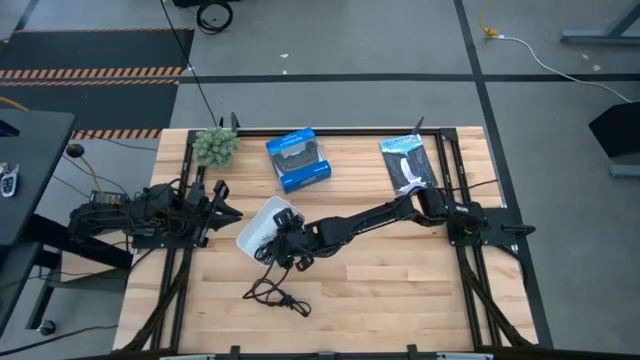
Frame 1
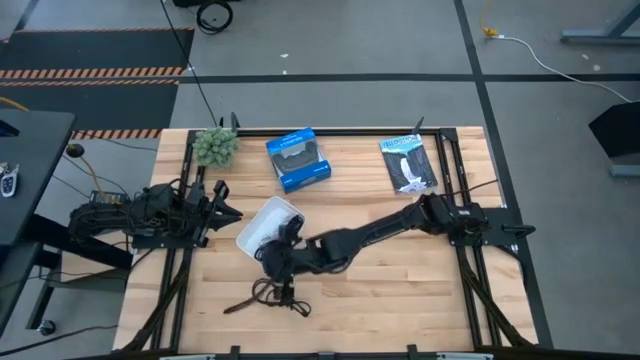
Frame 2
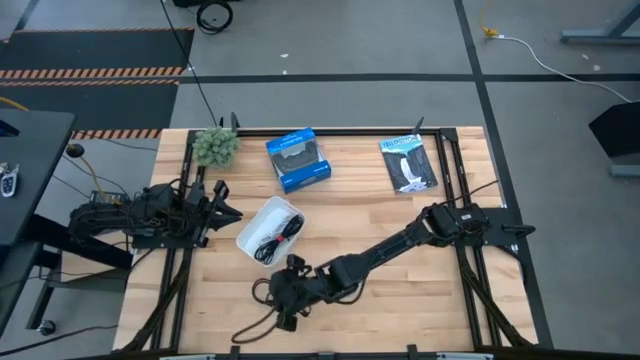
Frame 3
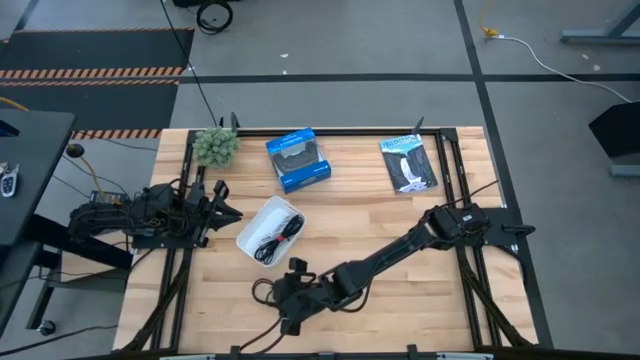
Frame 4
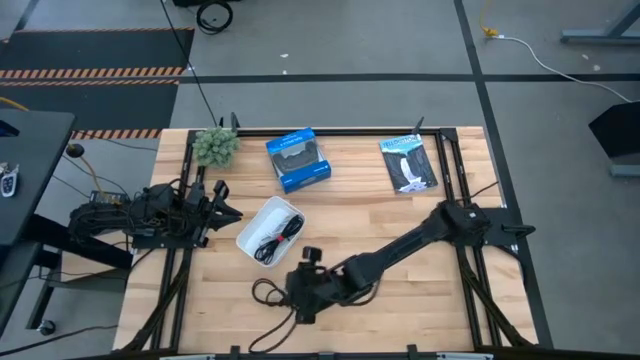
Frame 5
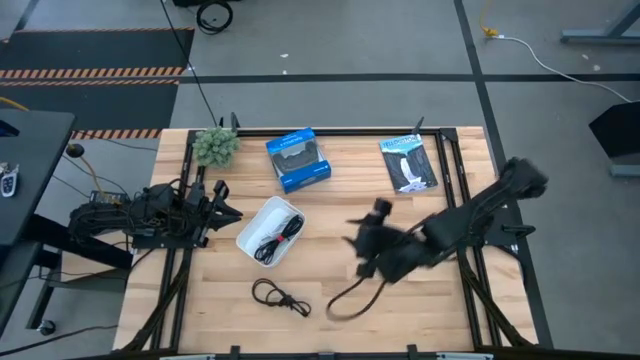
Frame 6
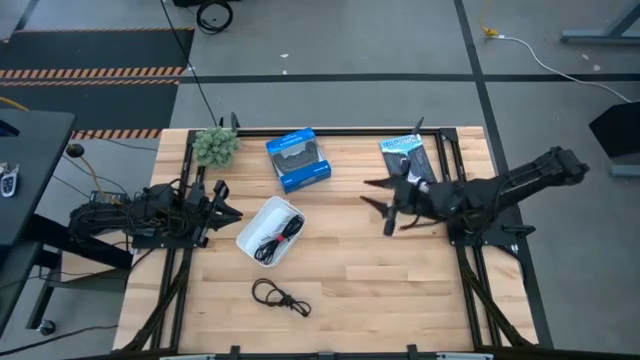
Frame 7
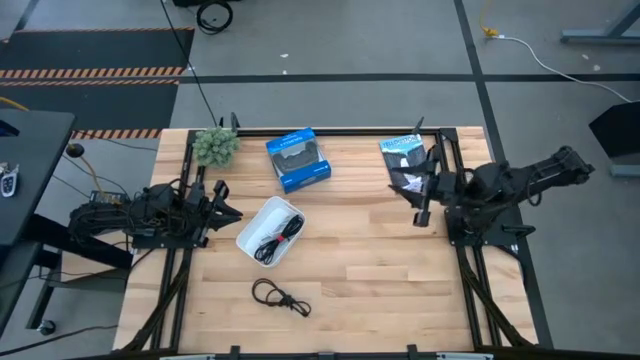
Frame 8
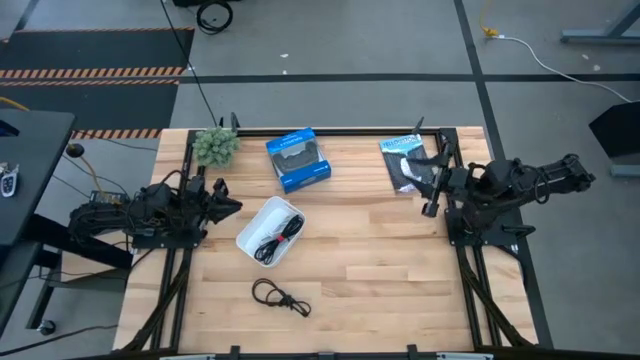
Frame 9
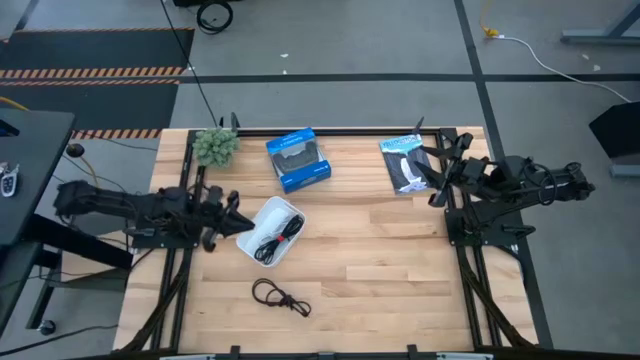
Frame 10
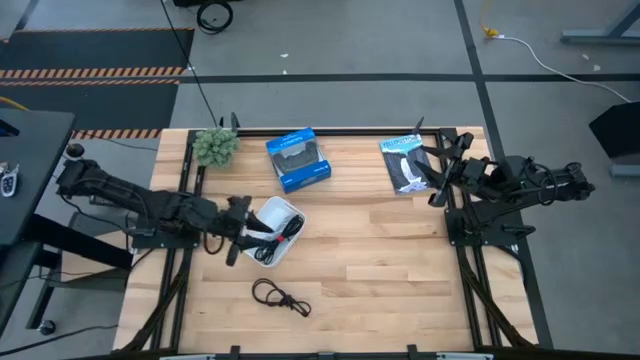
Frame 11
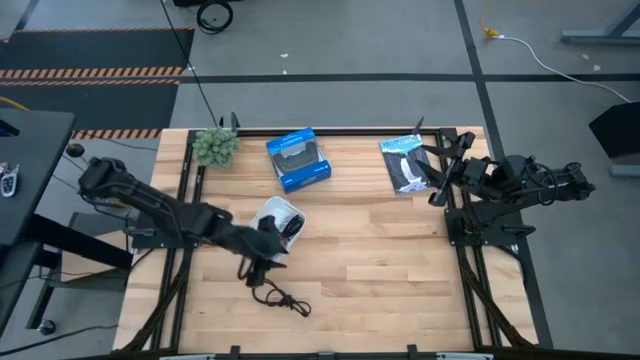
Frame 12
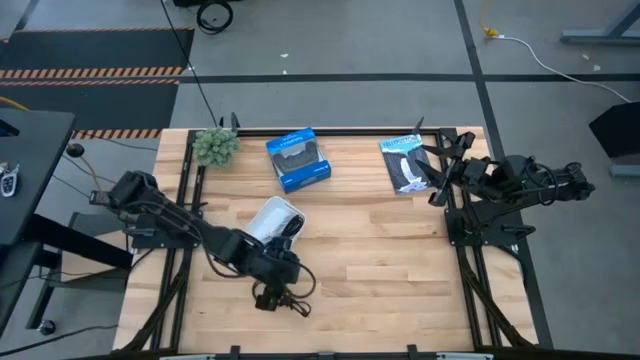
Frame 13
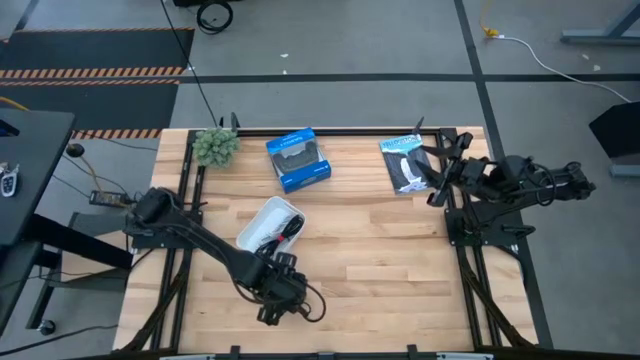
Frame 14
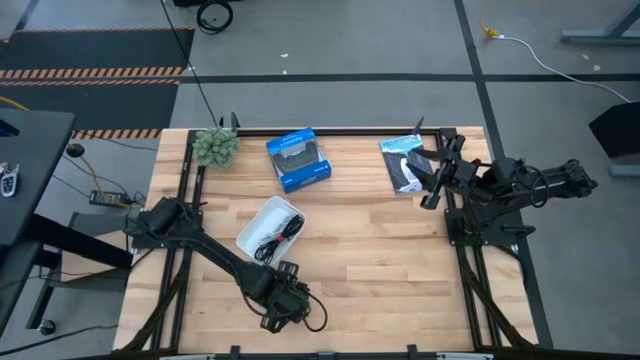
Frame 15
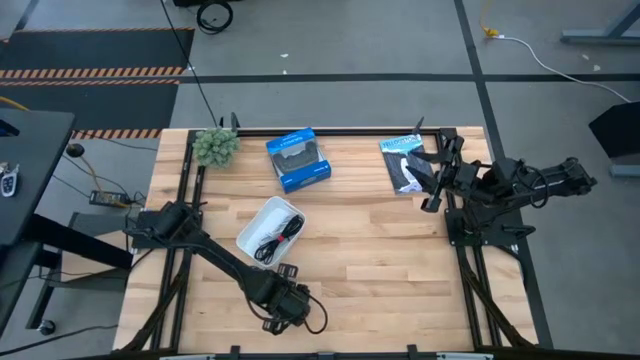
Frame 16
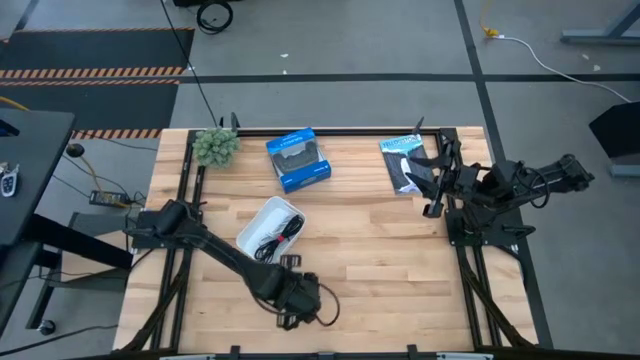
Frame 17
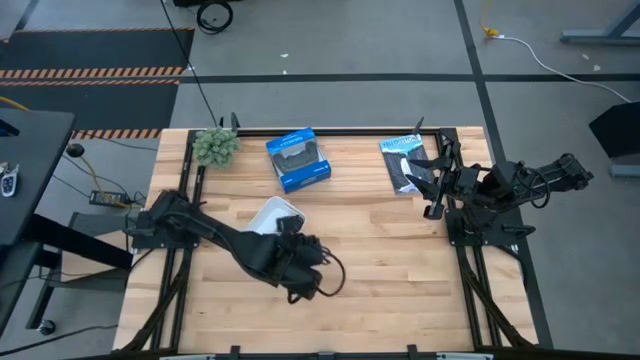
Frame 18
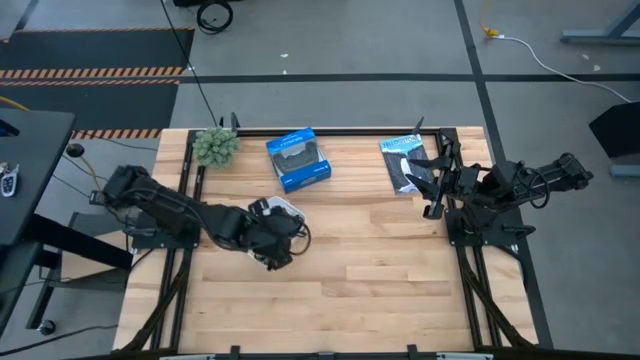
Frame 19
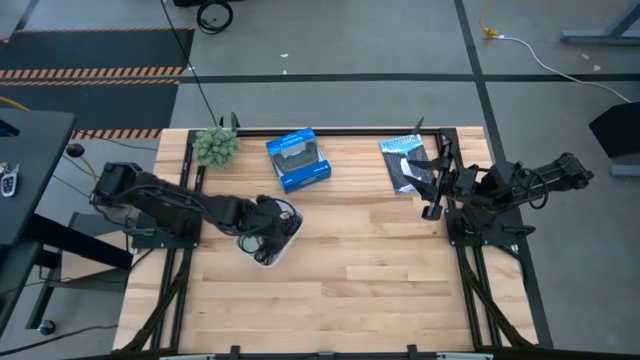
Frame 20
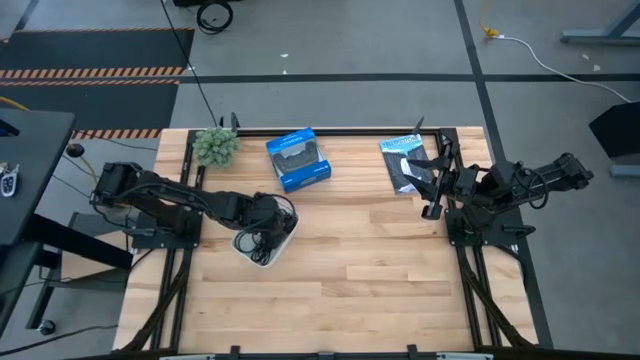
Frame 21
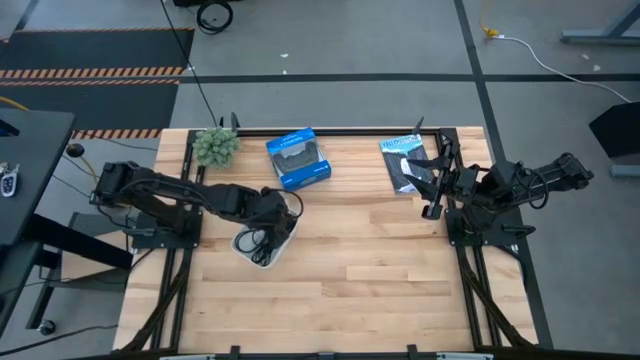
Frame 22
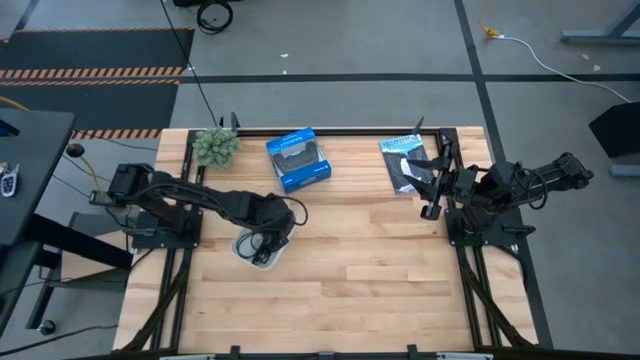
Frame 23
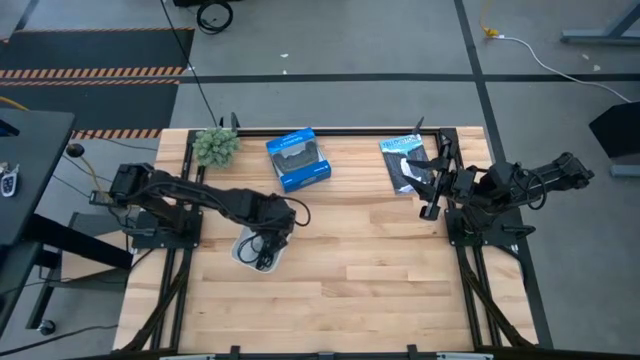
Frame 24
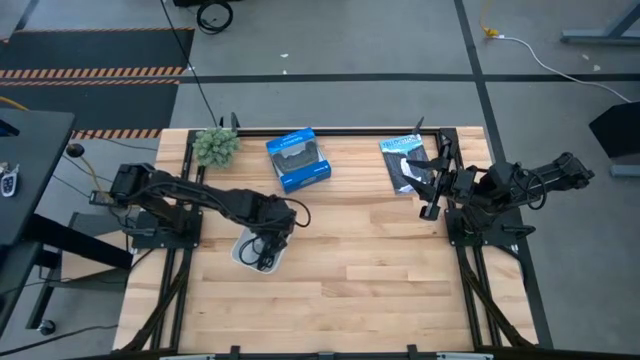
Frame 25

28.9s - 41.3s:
Task: Pick and place USB-C Cables
Put the black cable wire into the white bin

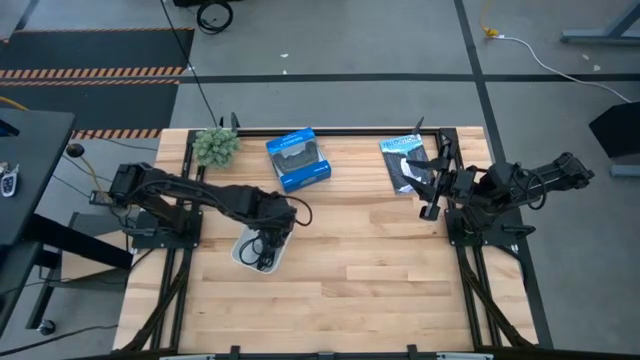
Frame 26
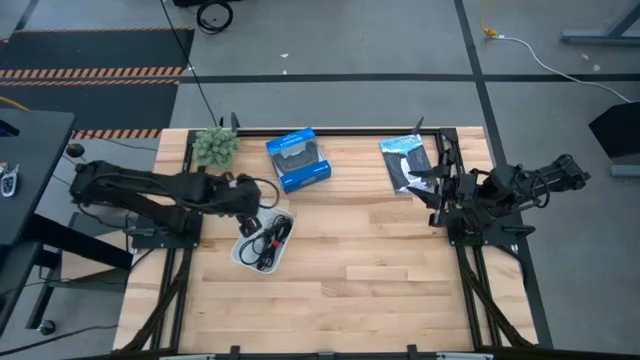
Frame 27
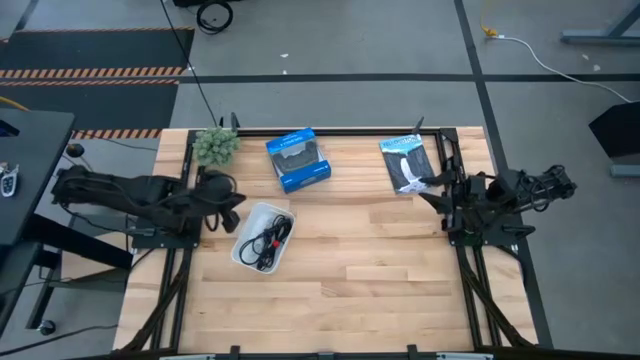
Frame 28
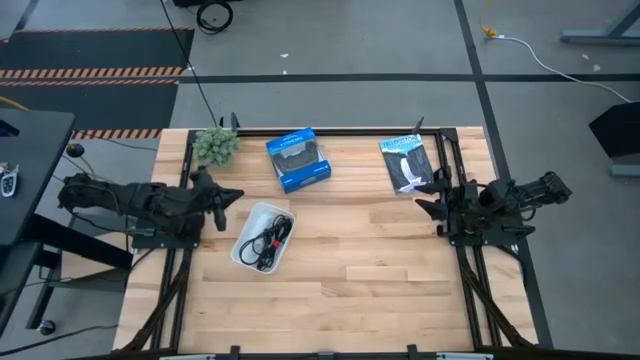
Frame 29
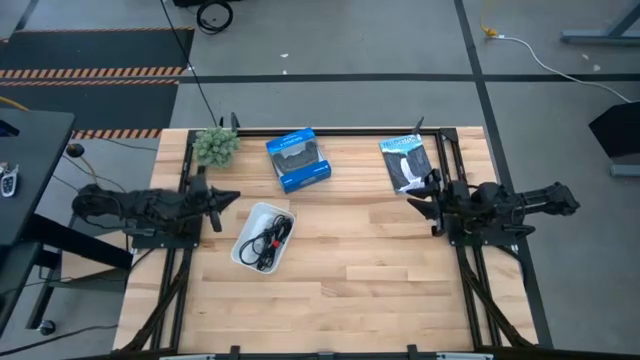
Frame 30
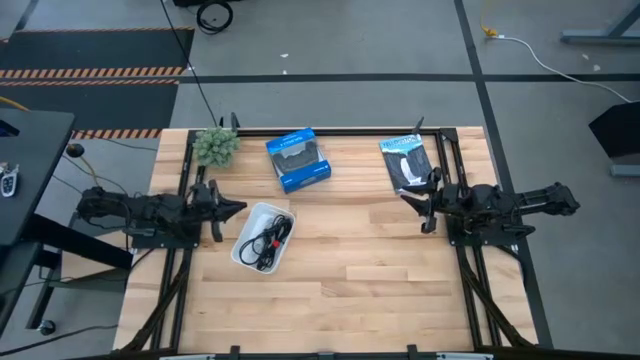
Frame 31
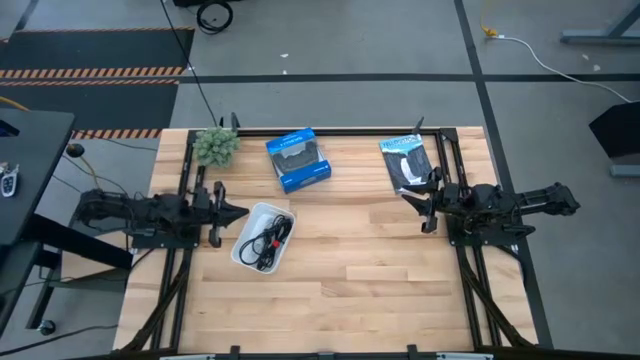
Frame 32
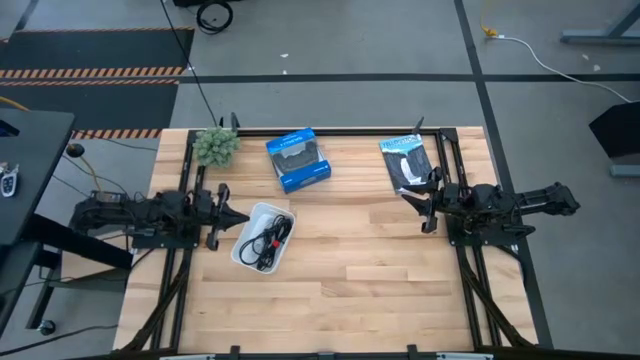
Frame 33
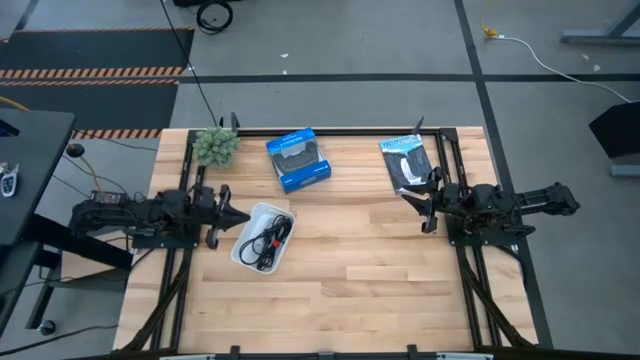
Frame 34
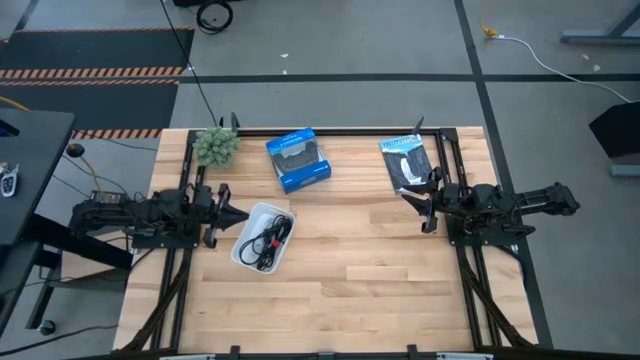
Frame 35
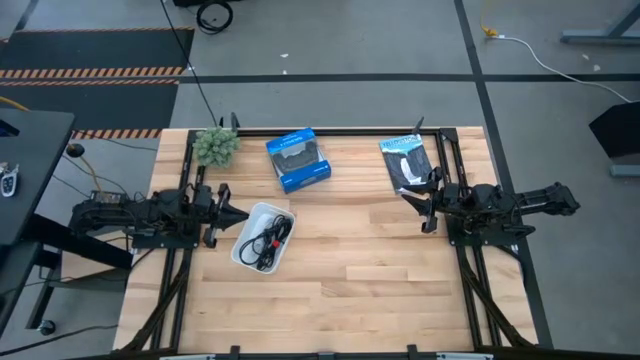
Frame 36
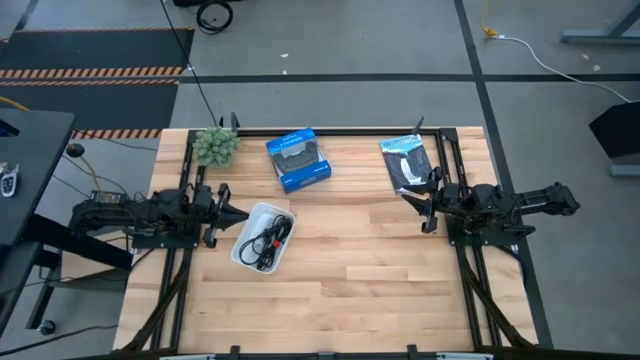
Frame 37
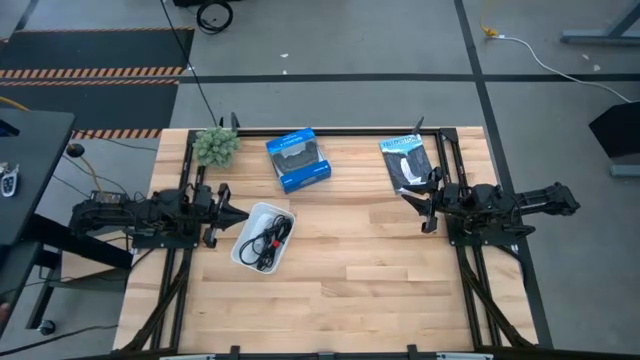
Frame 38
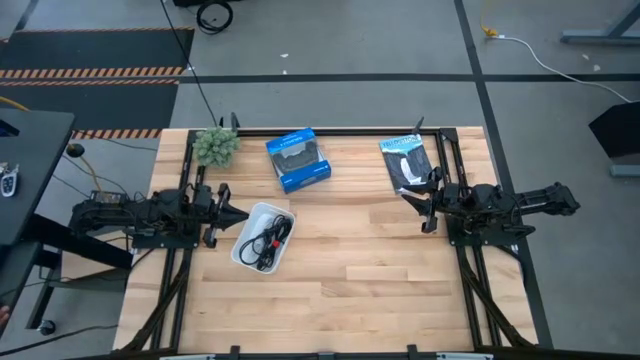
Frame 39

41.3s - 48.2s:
Return to Home Position

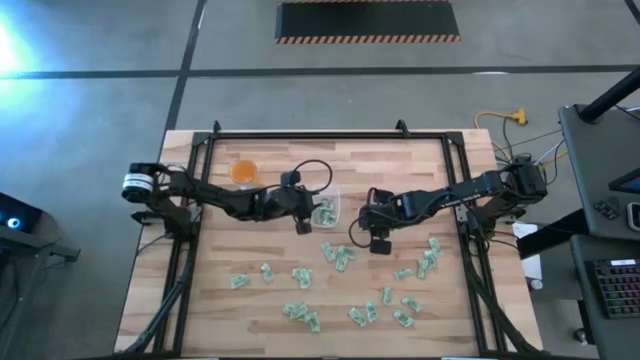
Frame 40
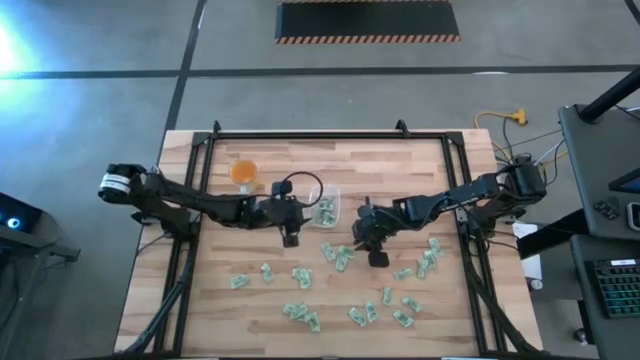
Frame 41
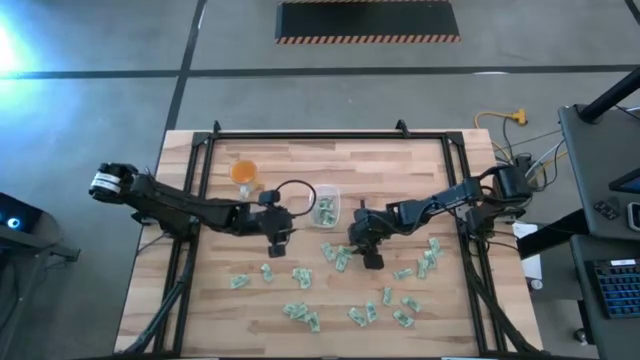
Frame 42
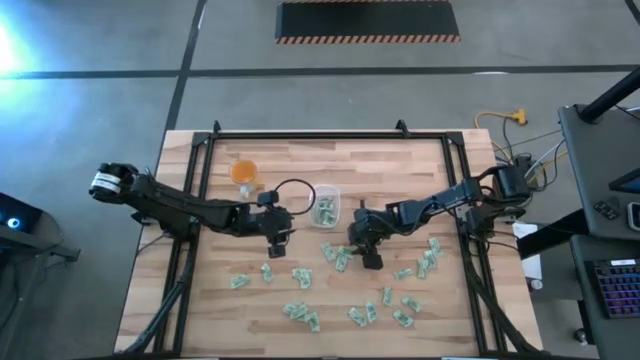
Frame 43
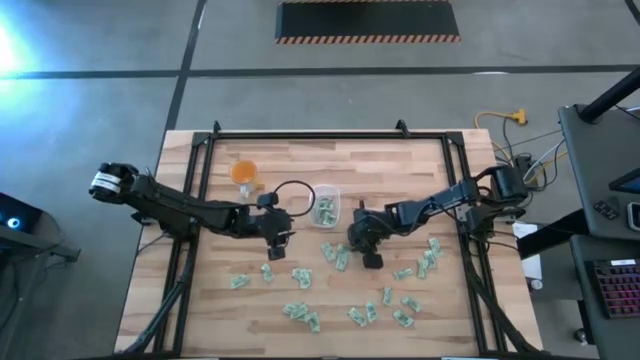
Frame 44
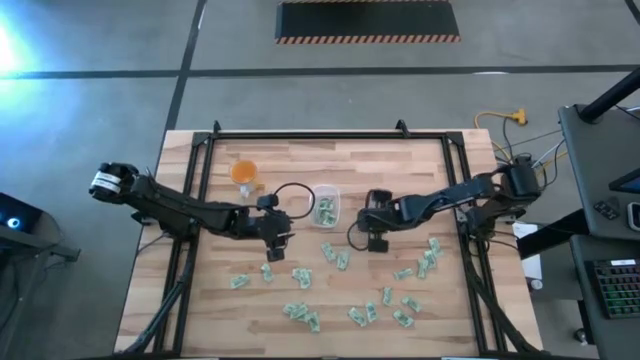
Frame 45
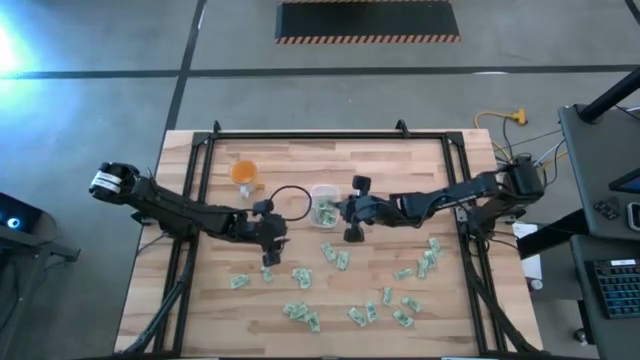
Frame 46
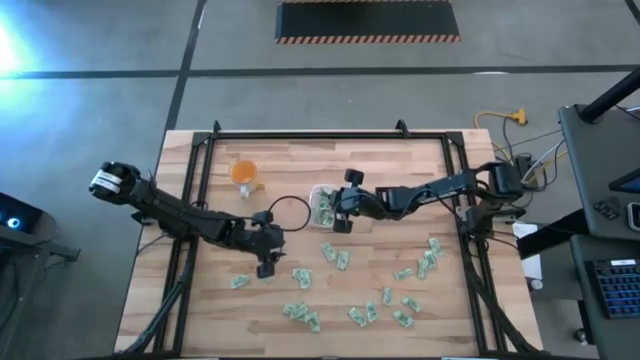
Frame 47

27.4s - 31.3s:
Task: Pick and place Stevia / Truvia into bins
Put the stevia packet into the bin
